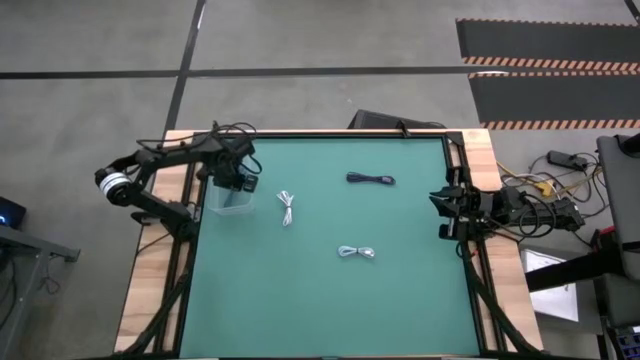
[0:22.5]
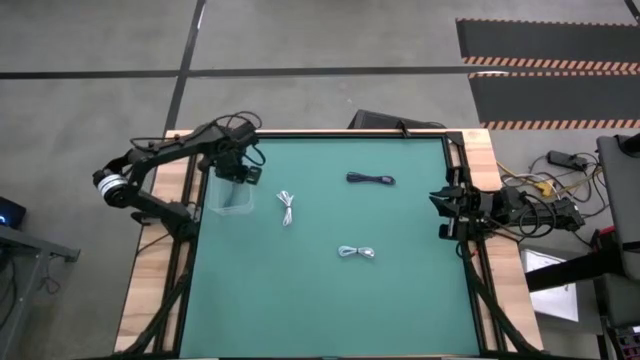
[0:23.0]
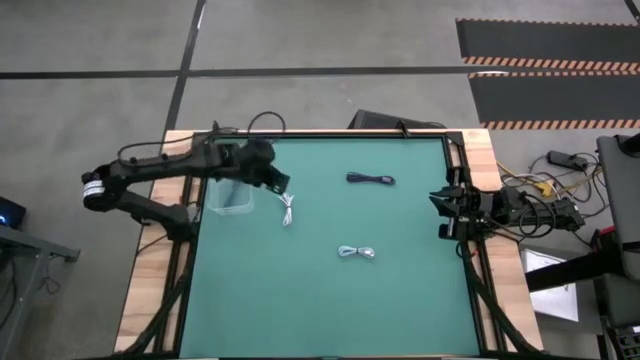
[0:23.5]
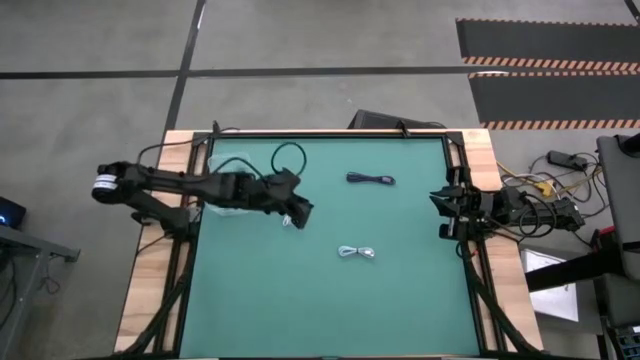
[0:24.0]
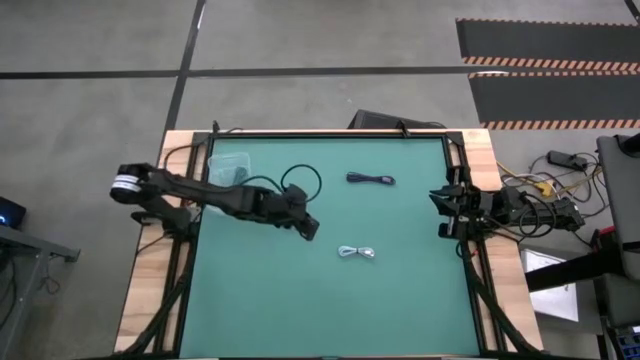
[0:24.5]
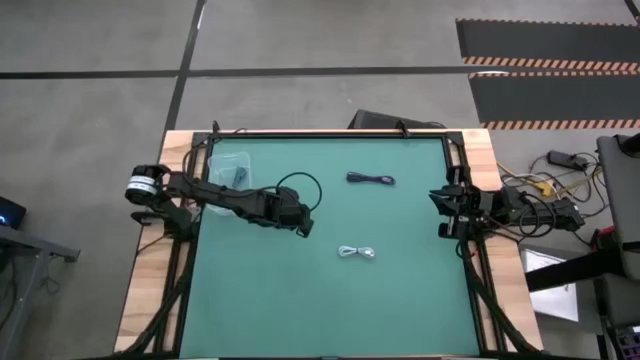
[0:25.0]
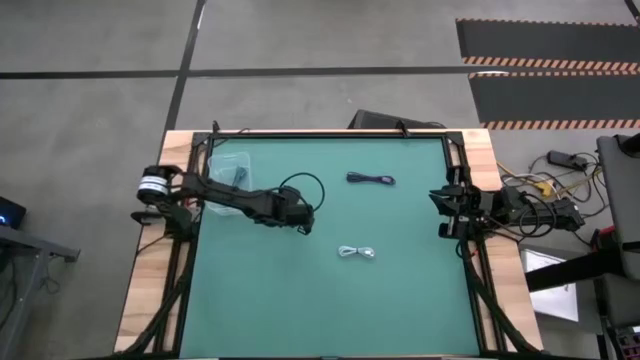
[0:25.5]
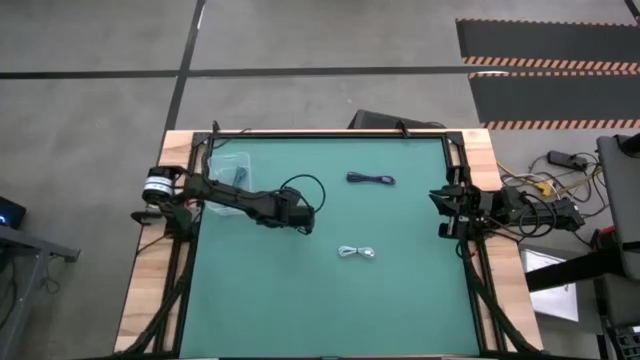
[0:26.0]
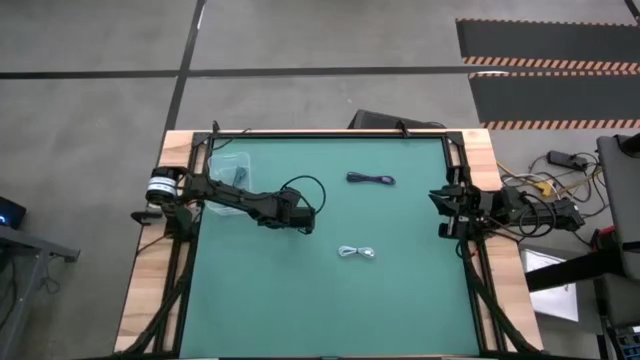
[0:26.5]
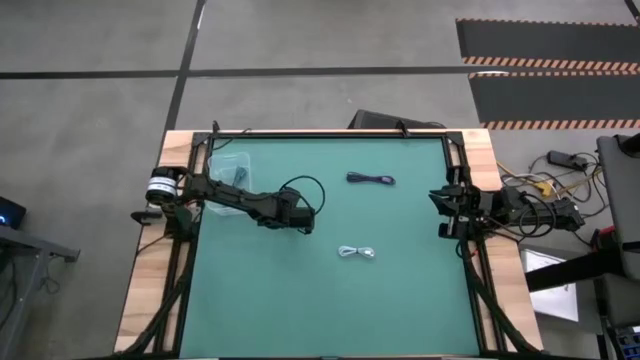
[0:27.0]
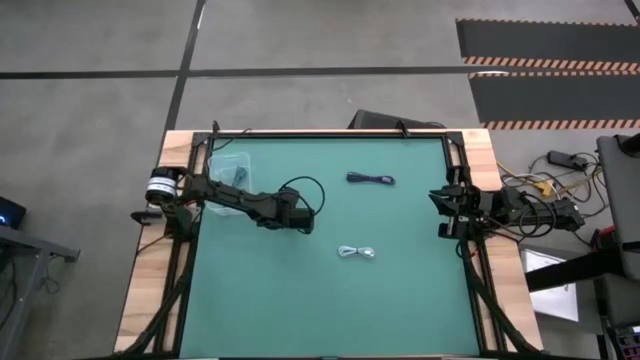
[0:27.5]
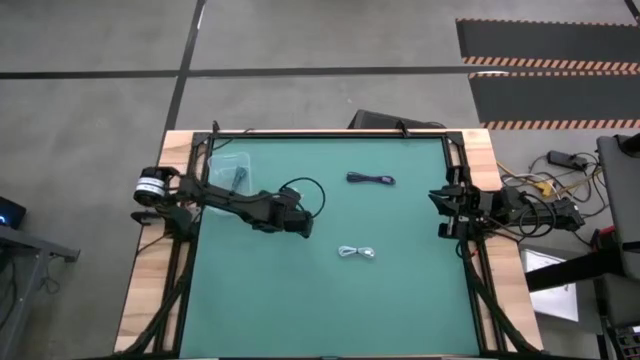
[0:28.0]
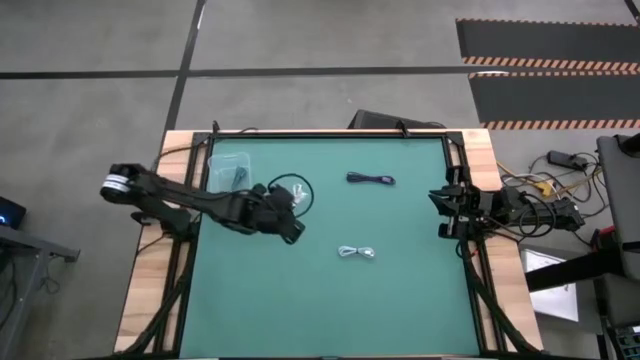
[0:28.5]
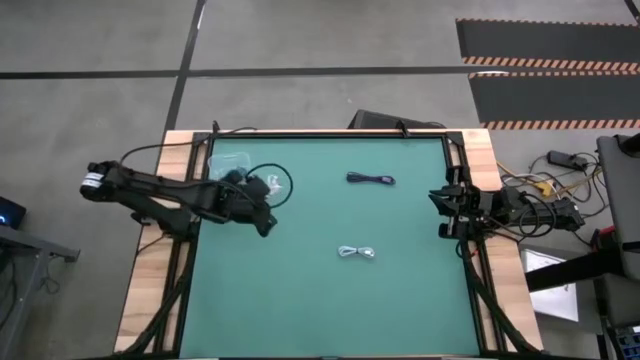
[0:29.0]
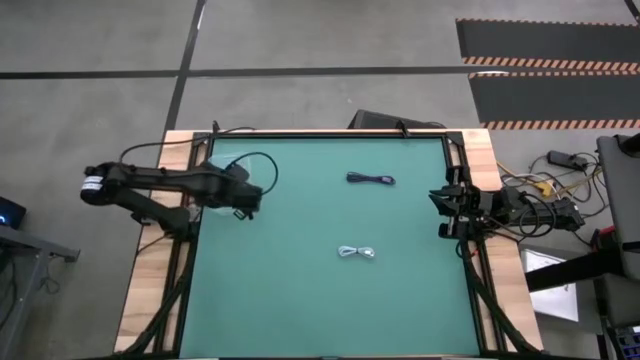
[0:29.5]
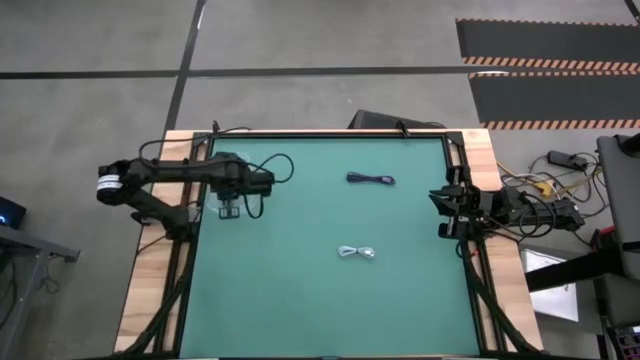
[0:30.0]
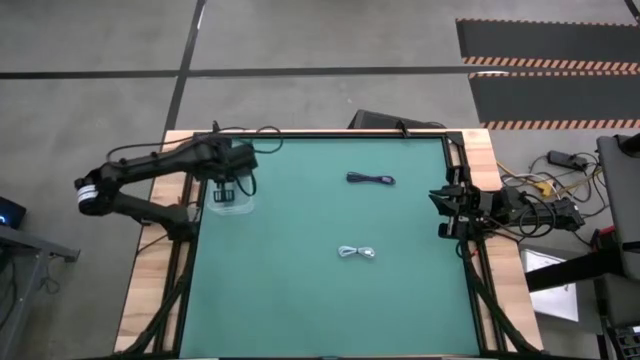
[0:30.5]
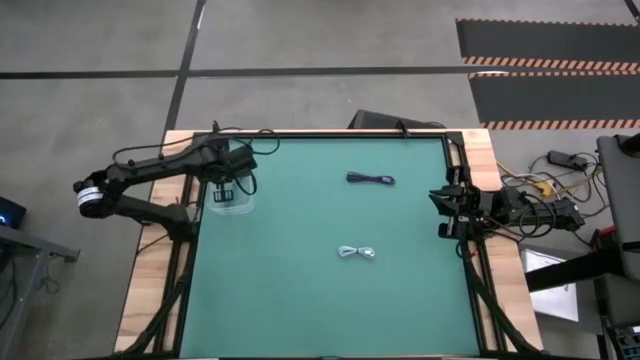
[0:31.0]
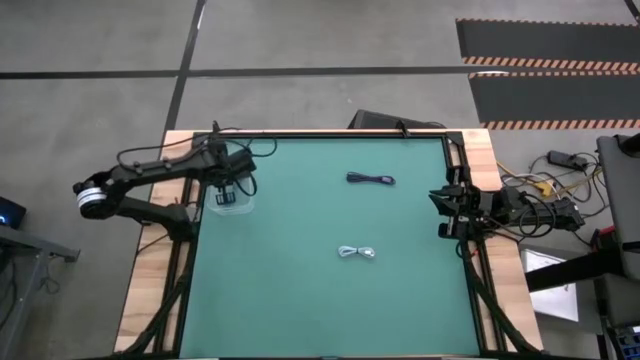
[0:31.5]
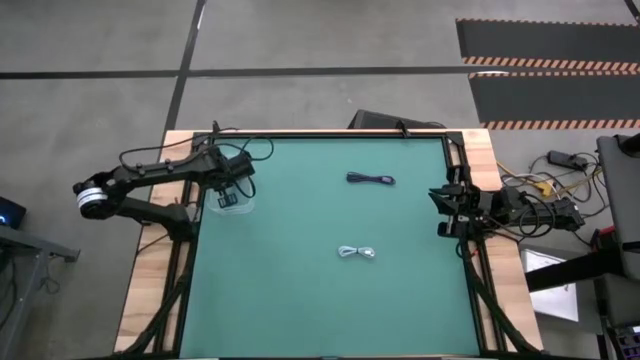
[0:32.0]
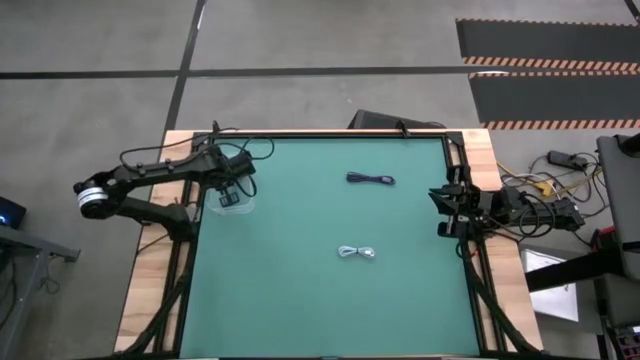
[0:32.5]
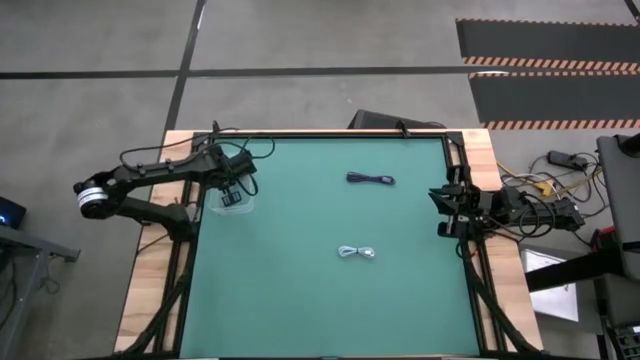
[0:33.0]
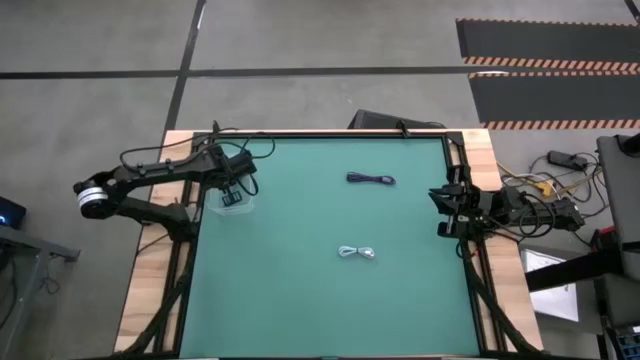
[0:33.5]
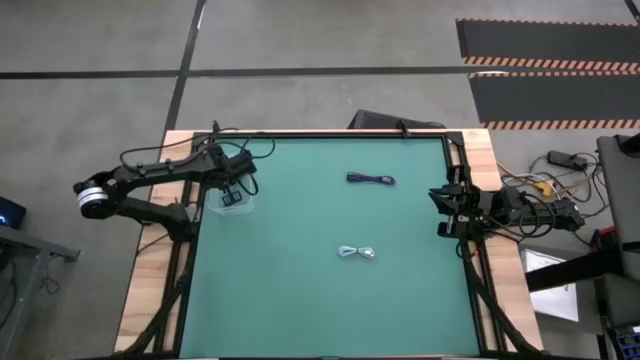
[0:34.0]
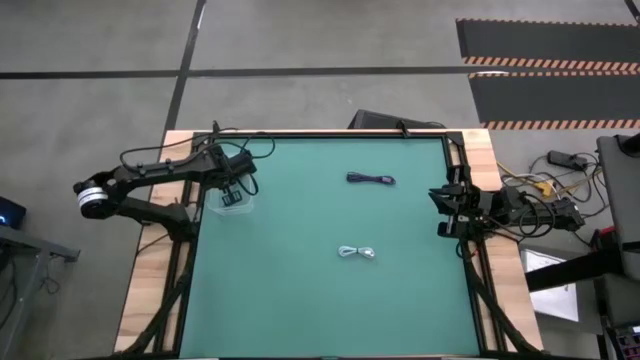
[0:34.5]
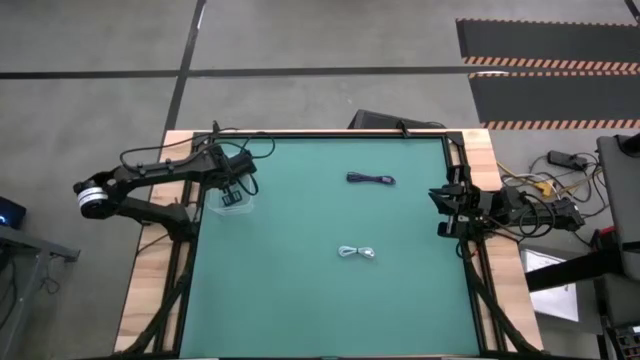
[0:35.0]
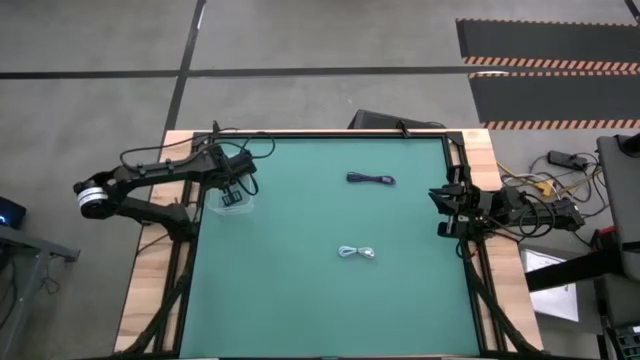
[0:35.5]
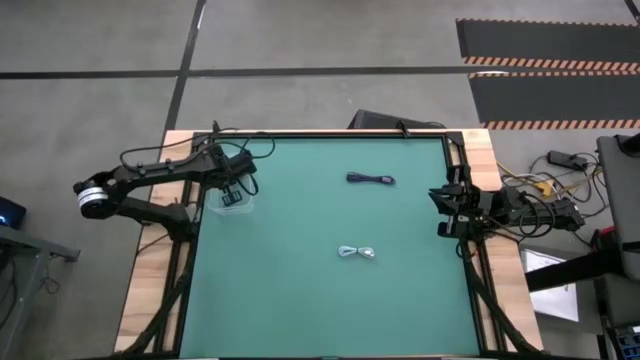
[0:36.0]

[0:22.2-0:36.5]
Task: Pick and place USB-C Cables
Put the white charger cable into the transparent bin

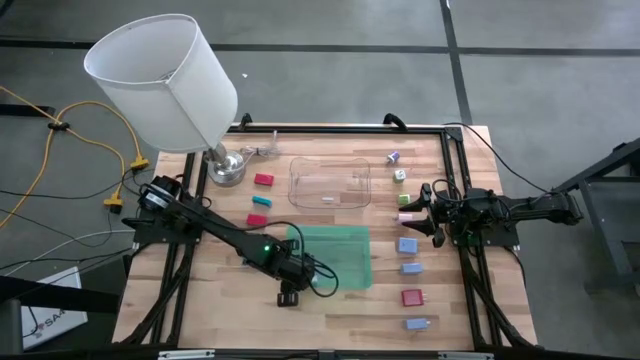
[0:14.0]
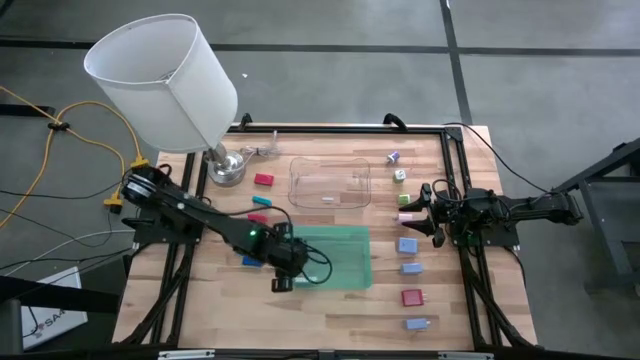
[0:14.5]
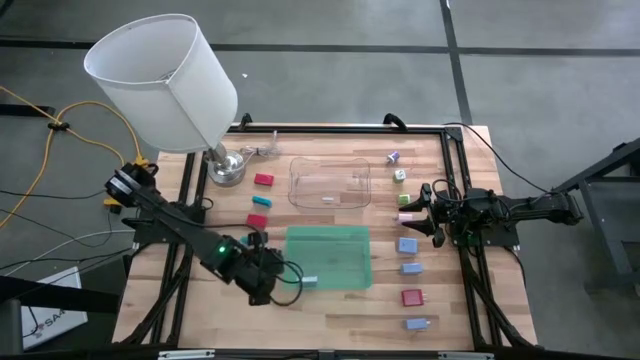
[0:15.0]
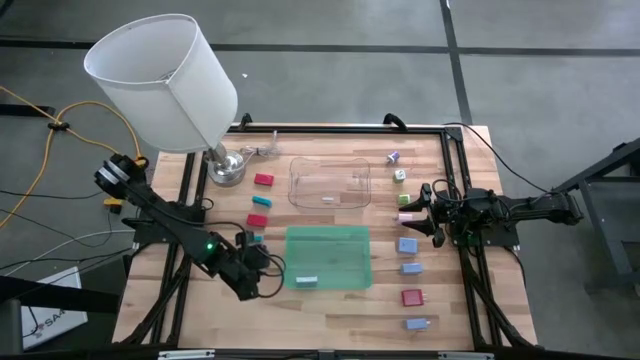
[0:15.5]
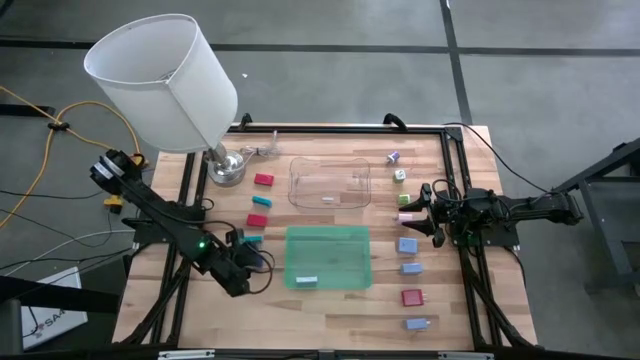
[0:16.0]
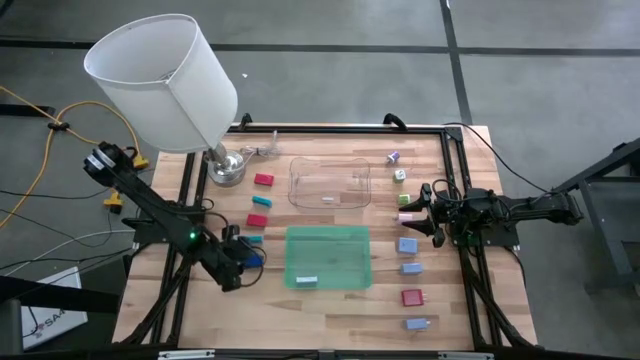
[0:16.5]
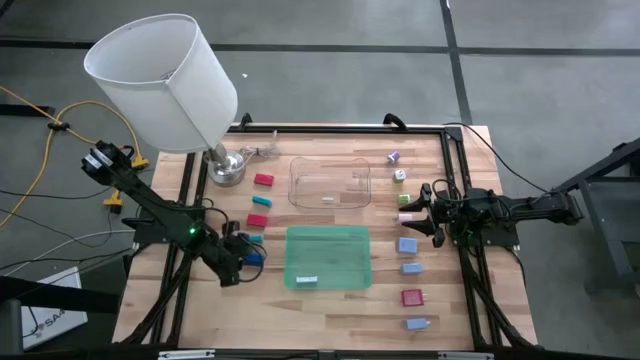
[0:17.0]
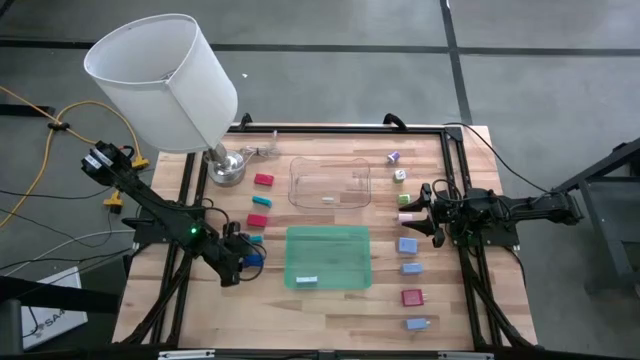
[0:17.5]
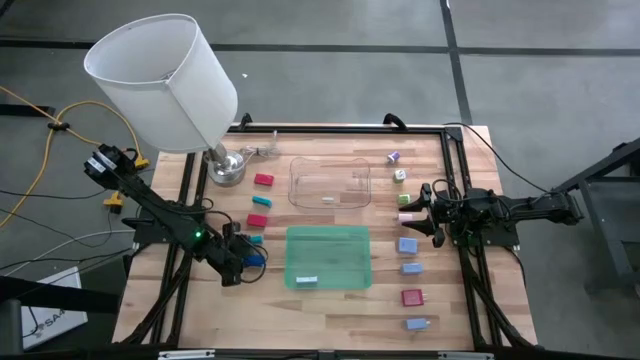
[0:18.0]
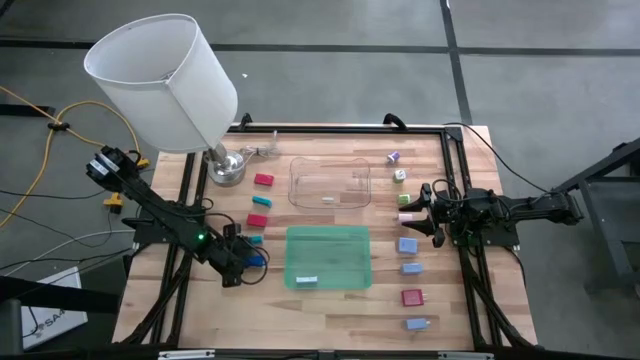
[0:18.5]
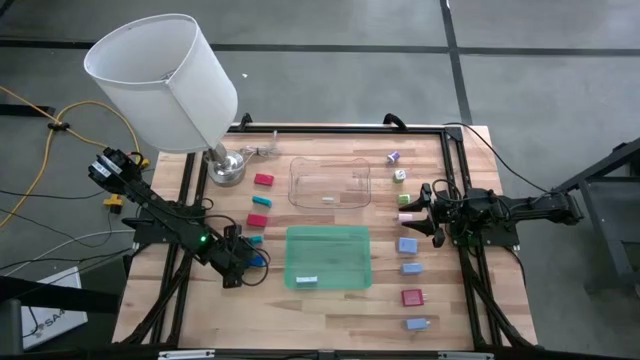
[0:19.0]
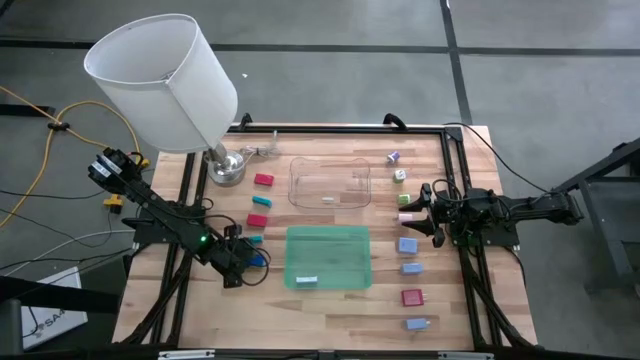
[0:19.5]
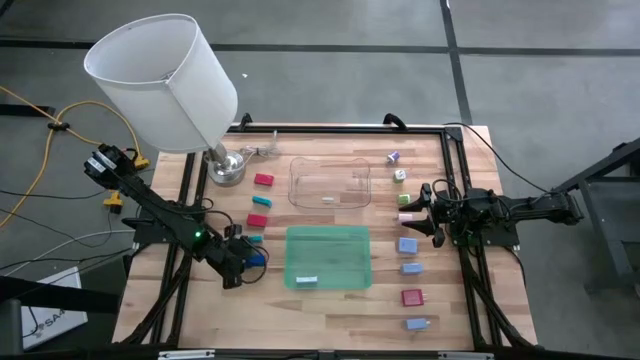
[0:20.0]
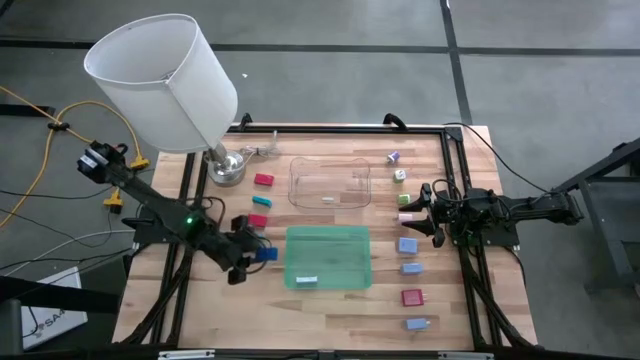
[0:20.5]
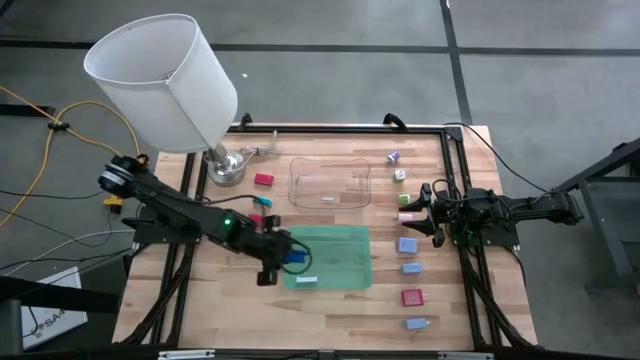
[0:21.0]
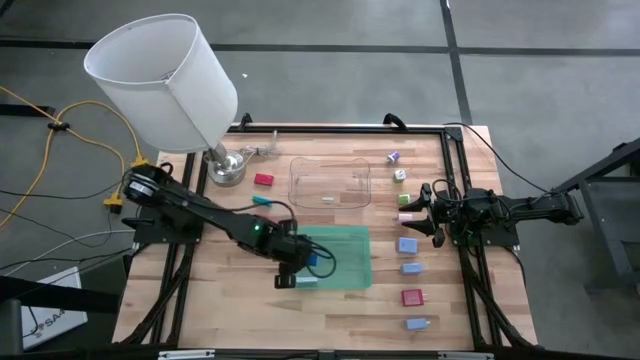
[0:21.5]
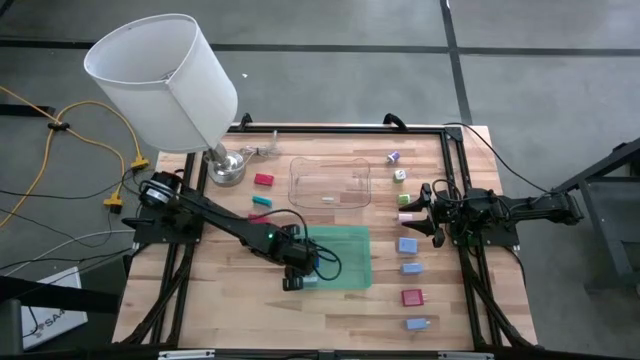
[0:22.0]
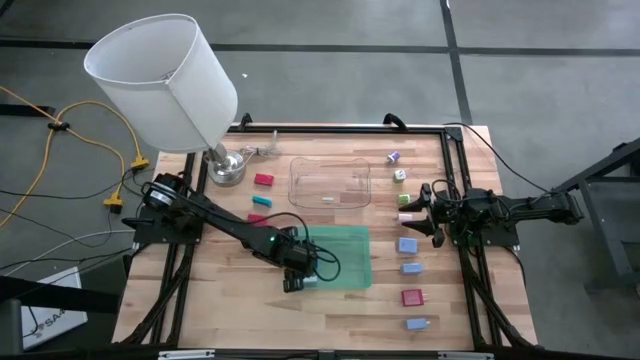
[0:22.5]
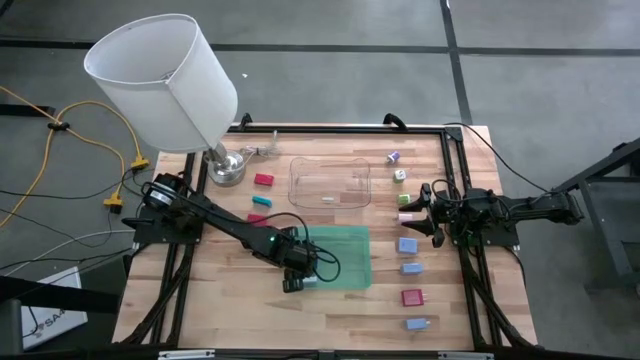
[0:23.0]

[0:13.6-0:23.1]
Task: Pick & Place Office items
Put the blue digital clock into the blue bin
